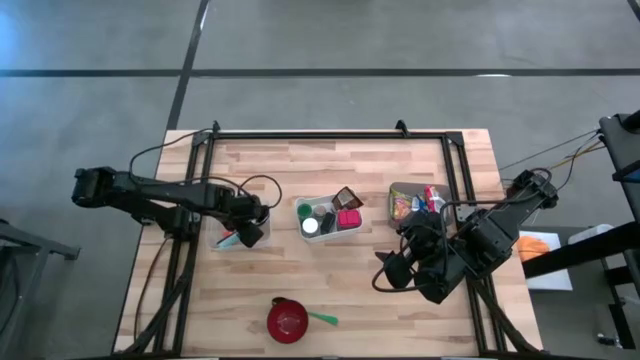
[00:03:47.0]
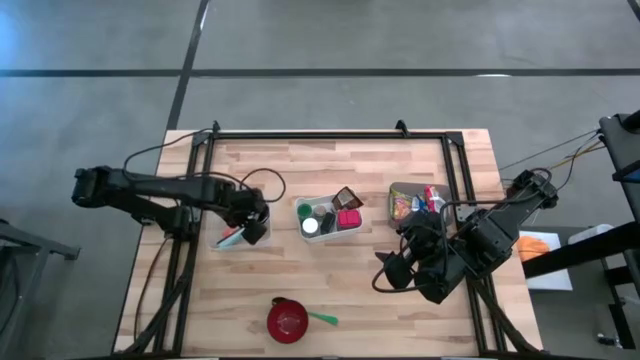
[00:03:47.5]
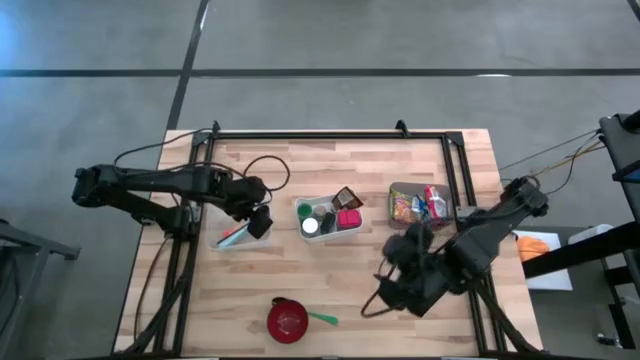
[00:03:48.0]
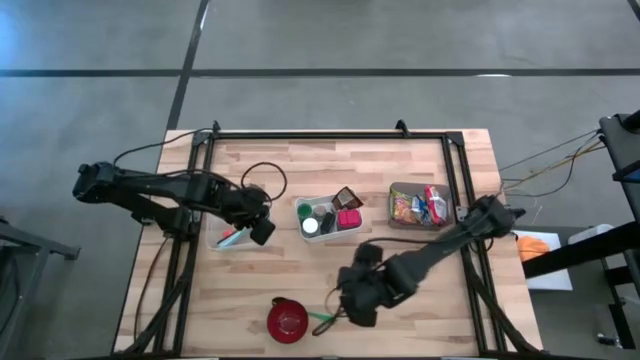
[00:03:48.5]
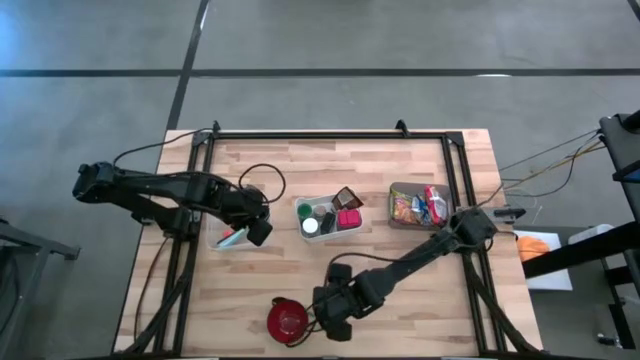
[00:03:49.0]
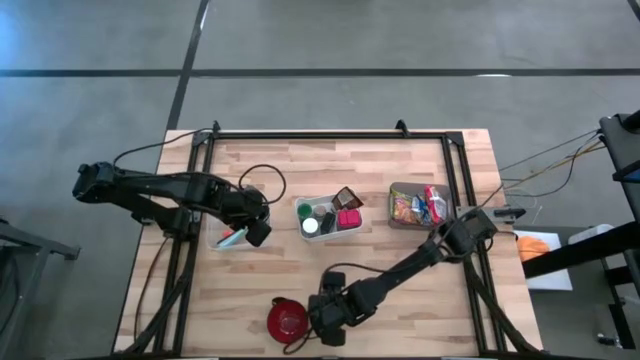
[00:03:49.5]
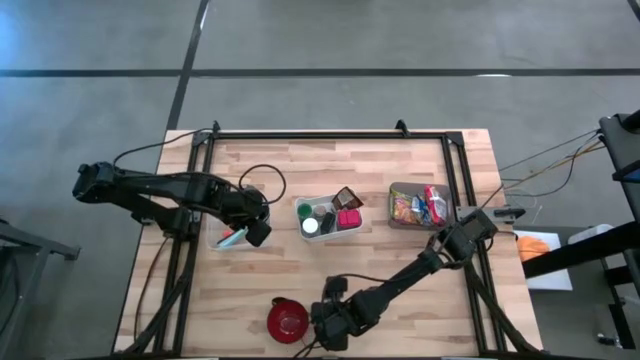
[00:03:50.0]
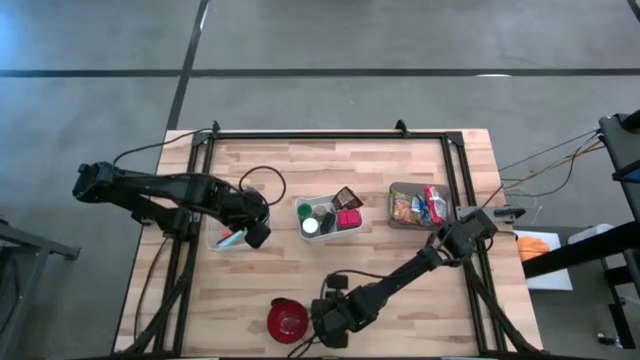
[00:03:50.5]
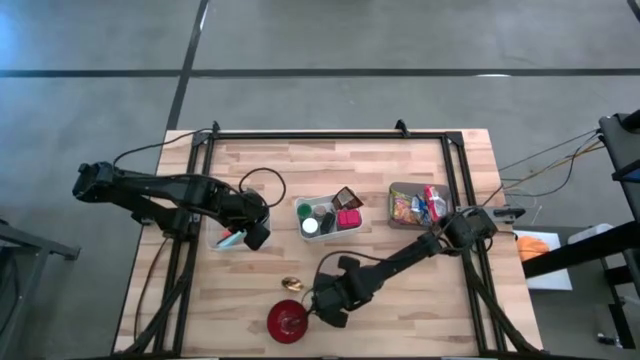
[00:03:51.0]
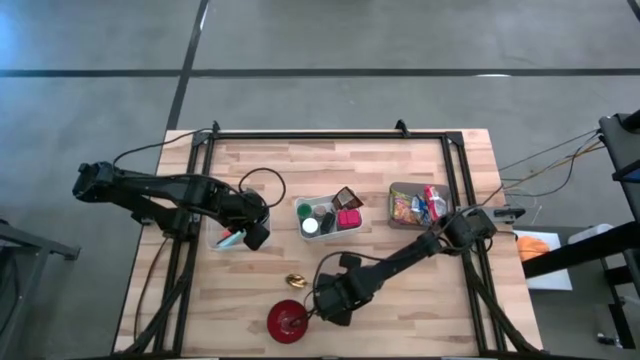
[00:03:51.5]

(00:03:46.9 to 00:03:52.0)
Put the green spoon into the transparent bin

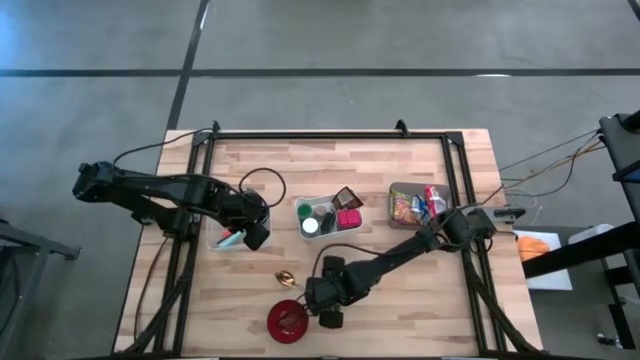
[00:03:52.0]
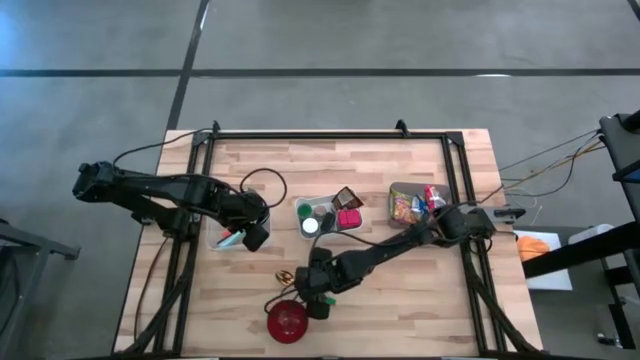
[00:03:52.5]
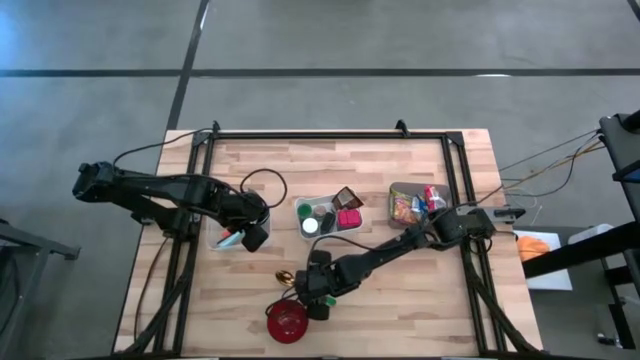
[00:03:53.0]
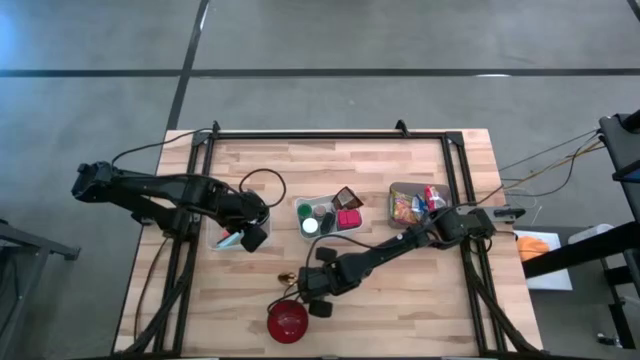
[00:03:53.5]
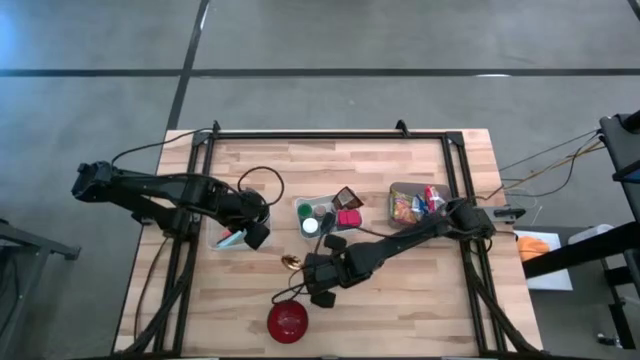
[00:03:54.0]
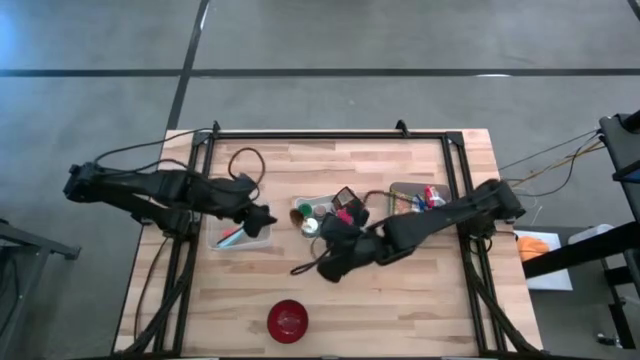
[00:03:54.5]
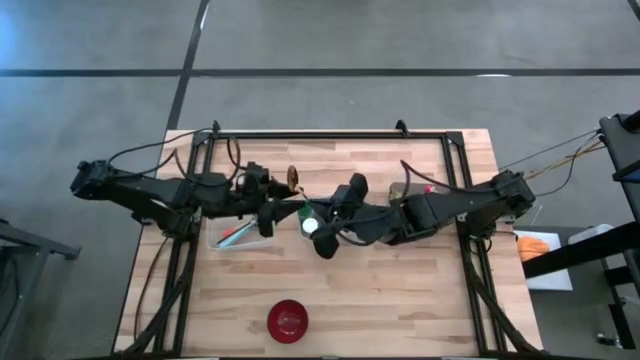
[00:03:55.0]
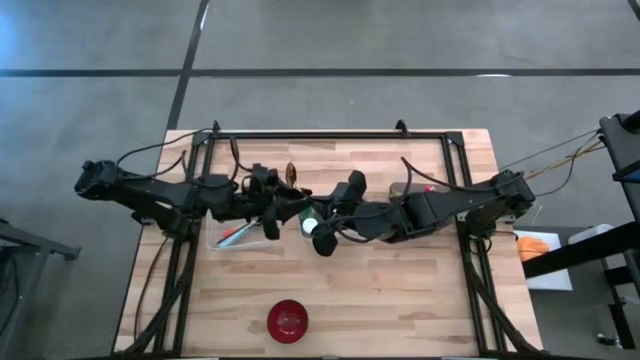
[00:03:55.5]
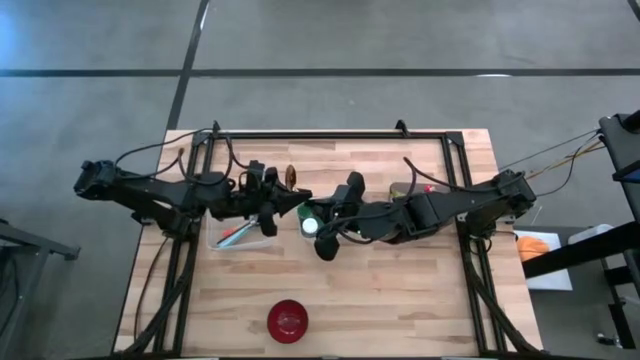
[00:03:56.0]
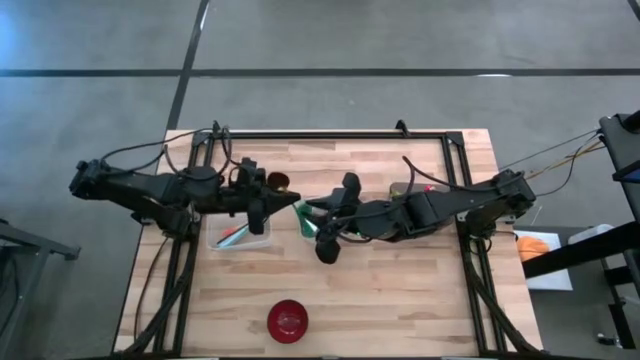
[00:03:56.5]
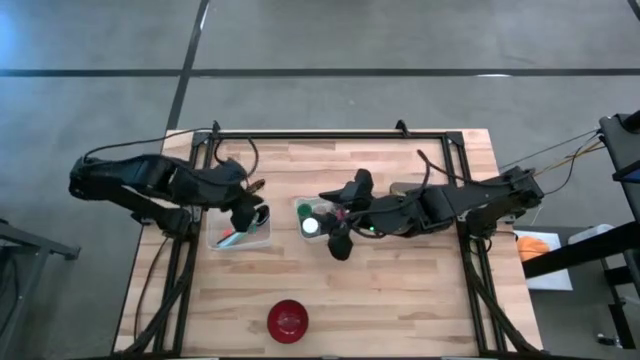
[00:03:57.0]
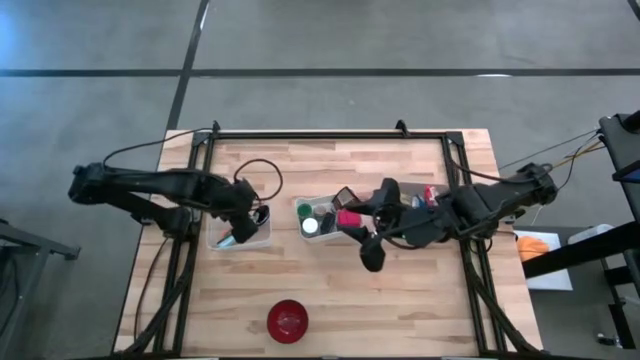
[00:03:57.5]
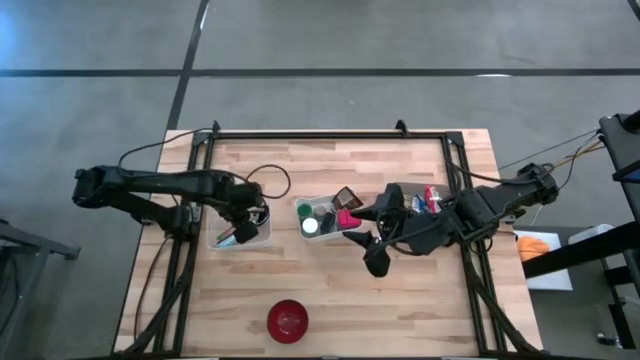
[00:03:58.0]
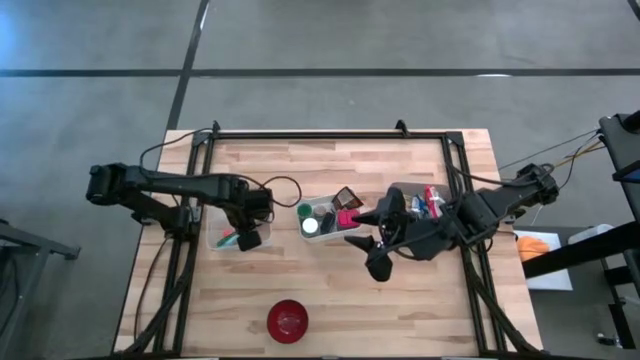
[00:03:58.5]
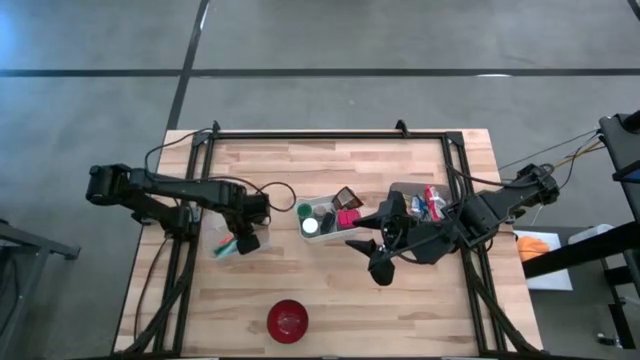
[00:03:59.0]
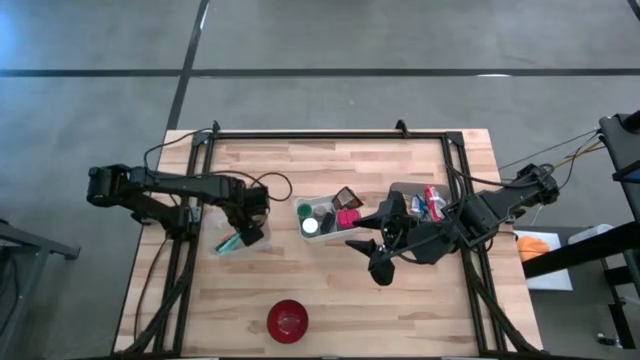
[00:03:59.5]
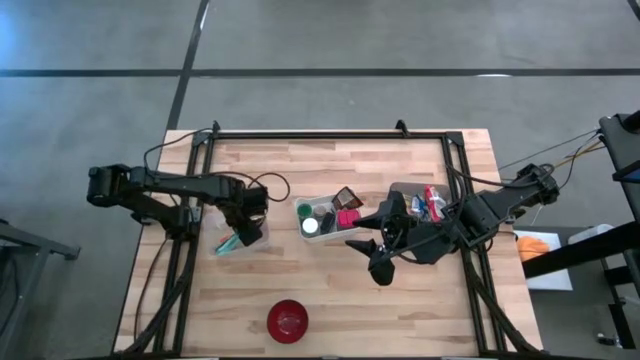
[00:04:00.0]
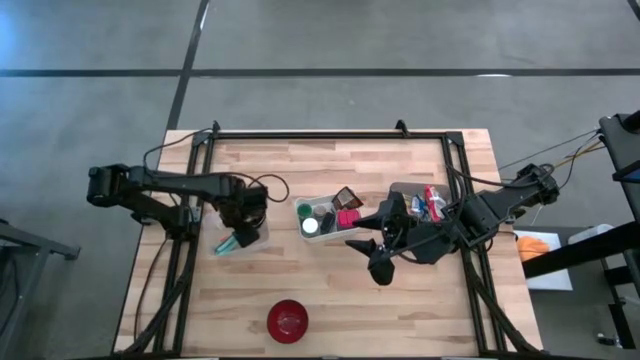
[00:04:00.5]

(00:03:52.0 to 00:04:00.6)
Put the green spoon into the transparent bin

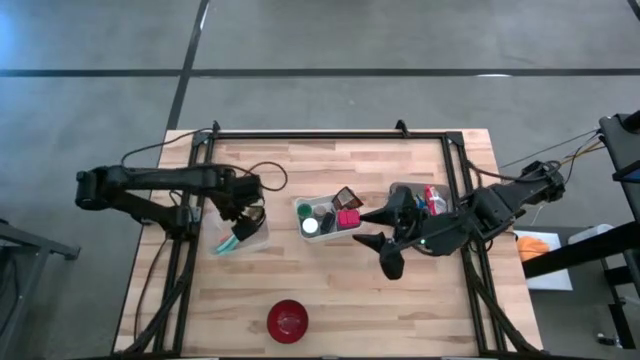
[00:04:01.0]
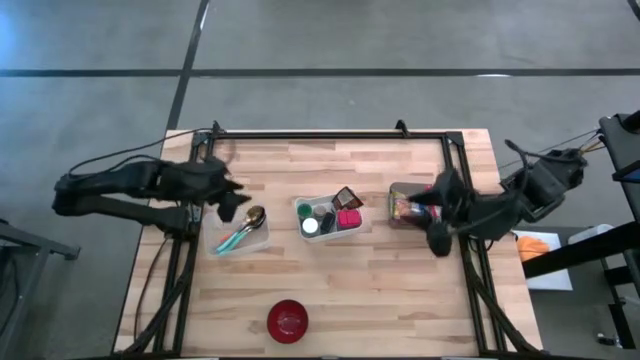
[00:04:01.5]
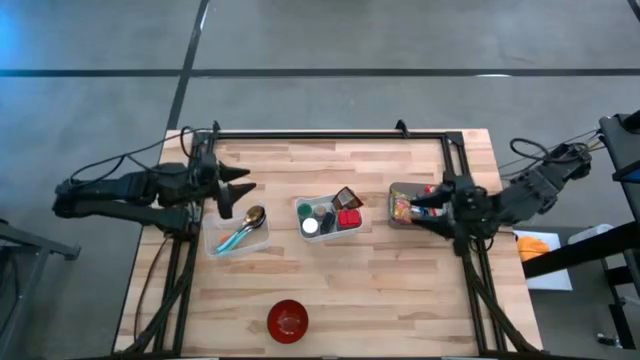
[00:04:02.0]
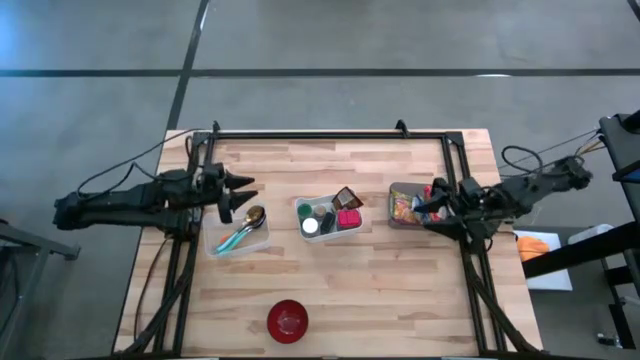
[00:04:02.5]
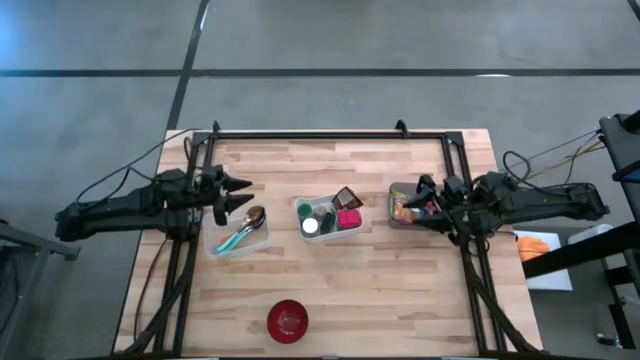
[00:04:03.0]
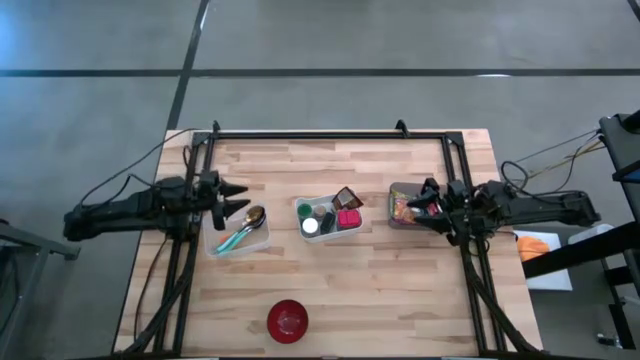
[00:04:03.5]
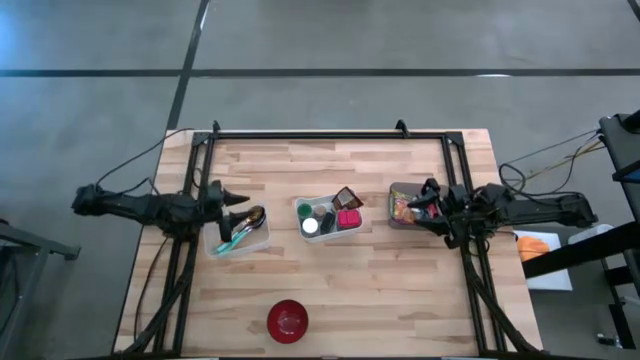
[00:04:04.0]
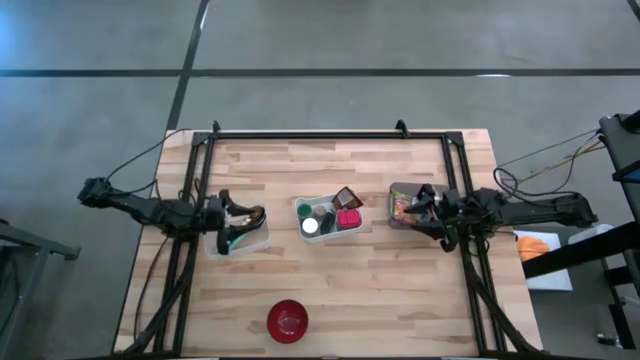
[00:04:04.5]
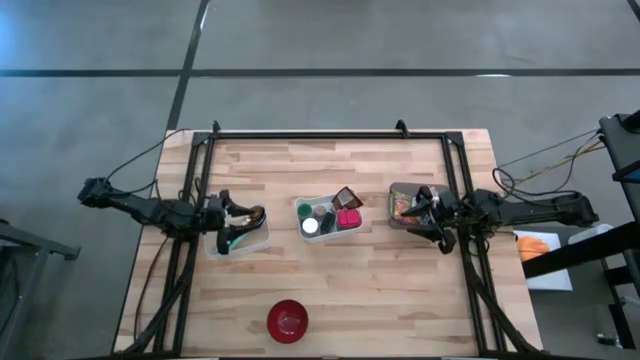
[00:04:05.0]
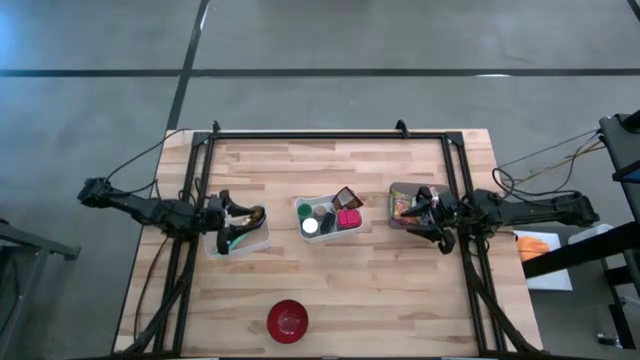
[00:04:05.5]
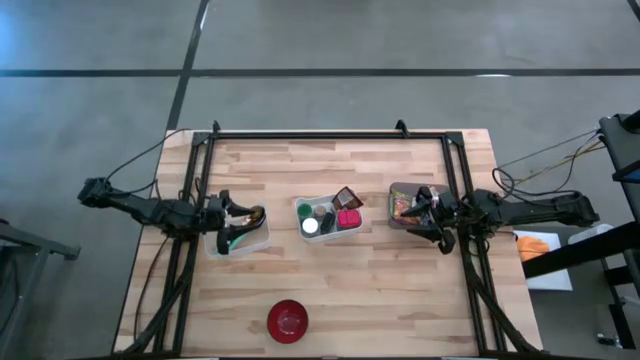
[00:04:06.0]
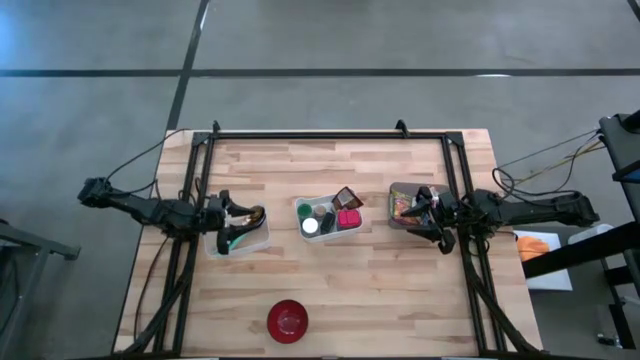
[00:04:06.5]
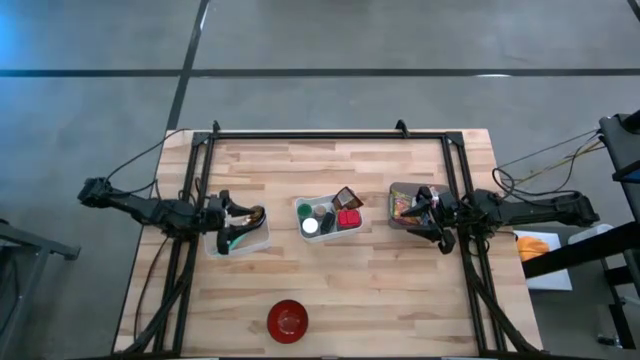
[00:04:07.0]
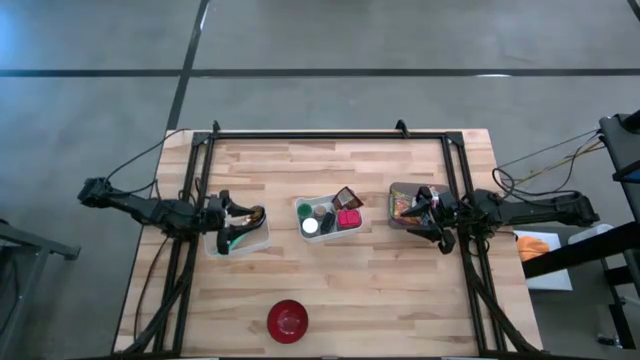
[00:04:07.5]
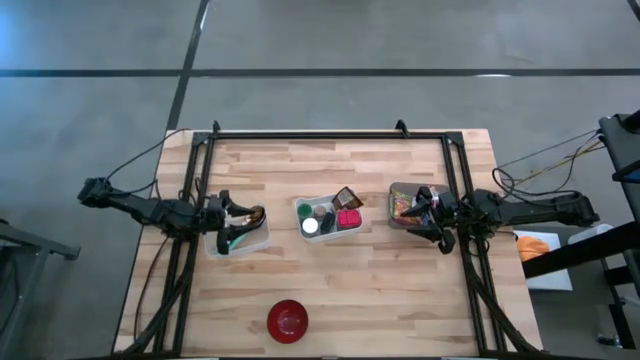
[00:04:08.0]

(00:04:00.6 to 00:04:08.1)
Return to Home Position
